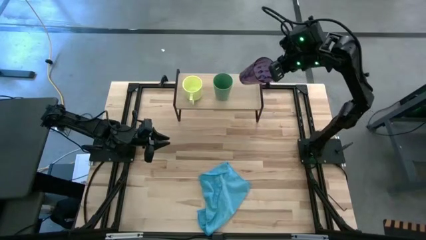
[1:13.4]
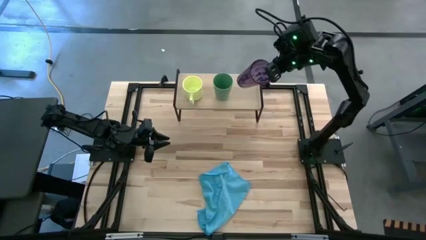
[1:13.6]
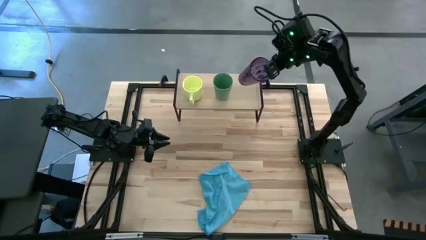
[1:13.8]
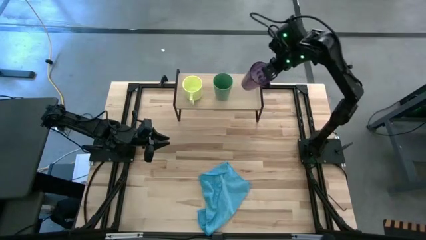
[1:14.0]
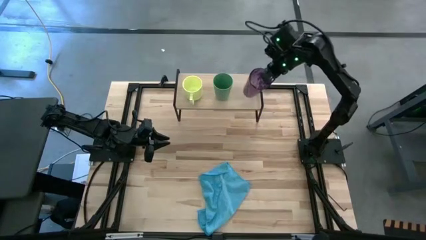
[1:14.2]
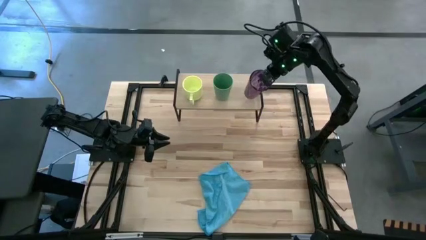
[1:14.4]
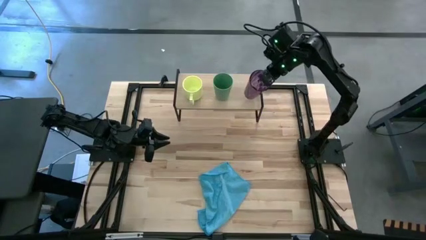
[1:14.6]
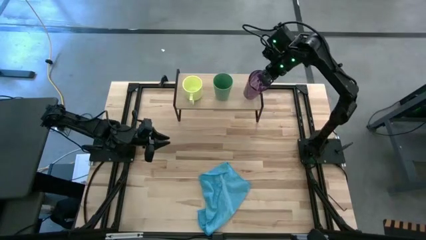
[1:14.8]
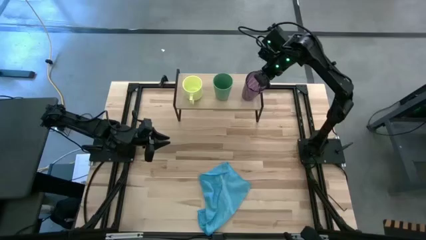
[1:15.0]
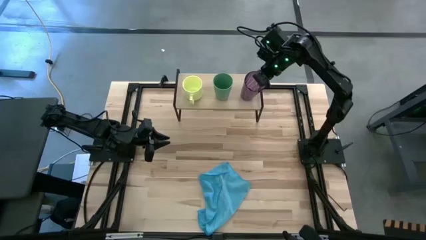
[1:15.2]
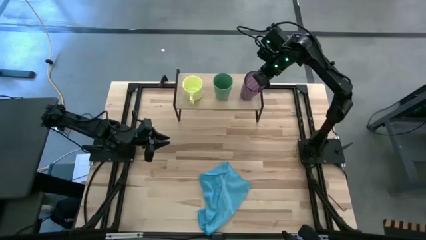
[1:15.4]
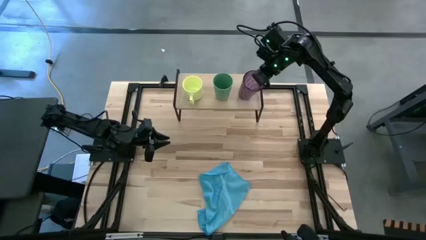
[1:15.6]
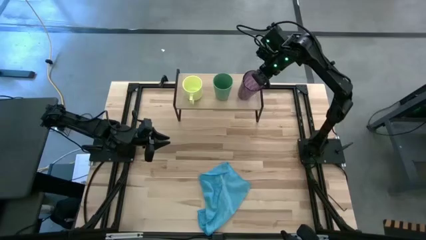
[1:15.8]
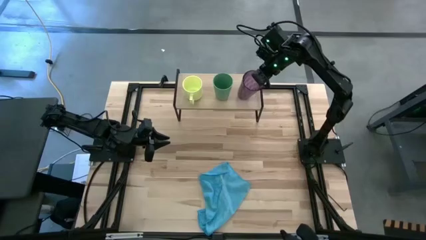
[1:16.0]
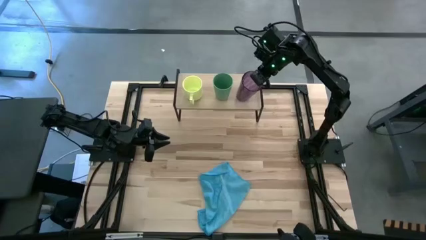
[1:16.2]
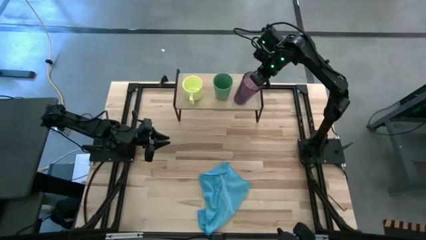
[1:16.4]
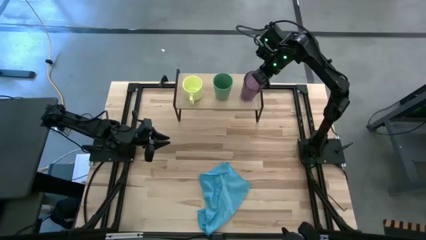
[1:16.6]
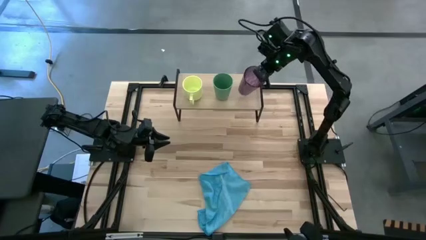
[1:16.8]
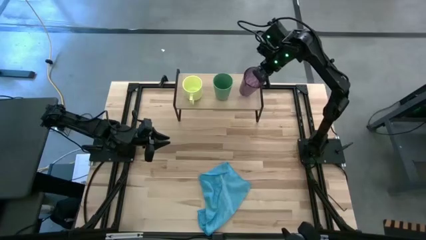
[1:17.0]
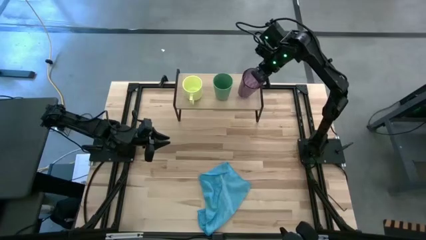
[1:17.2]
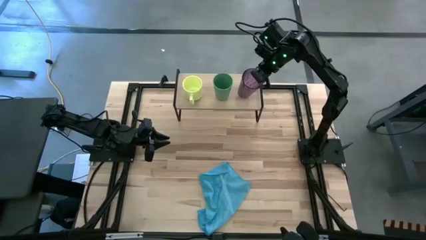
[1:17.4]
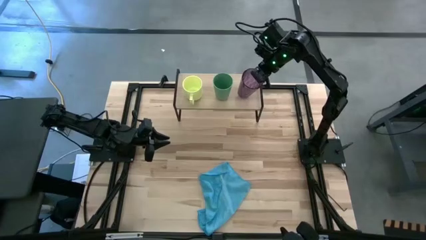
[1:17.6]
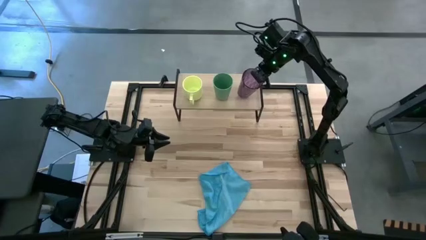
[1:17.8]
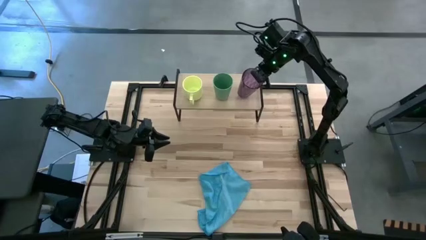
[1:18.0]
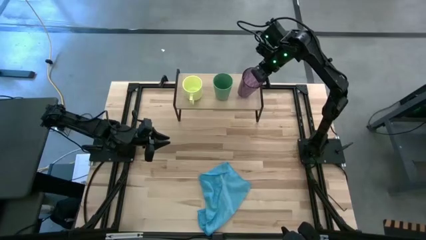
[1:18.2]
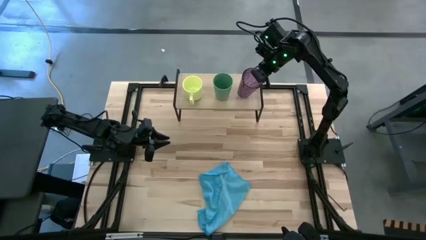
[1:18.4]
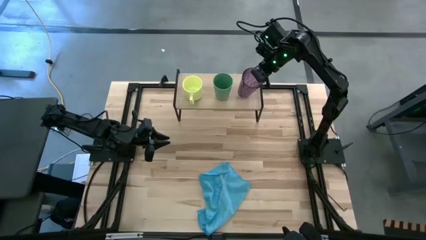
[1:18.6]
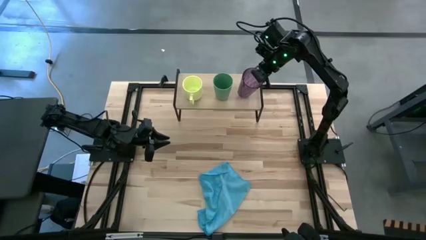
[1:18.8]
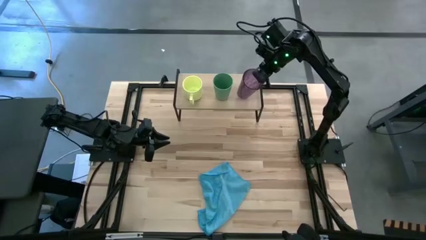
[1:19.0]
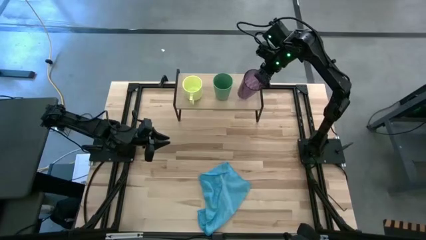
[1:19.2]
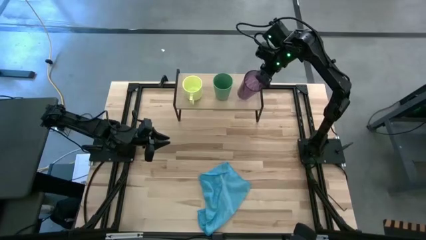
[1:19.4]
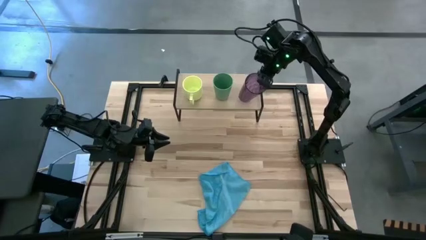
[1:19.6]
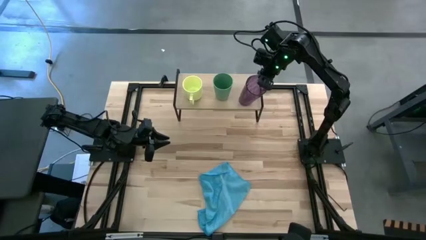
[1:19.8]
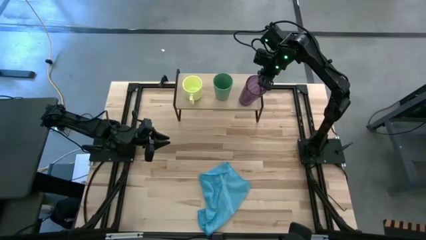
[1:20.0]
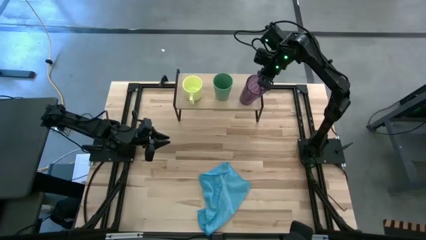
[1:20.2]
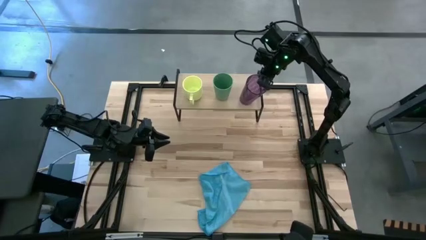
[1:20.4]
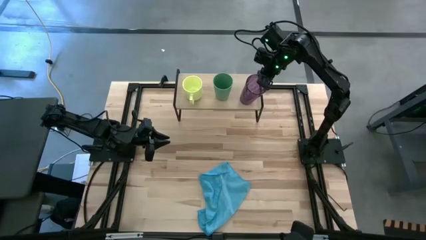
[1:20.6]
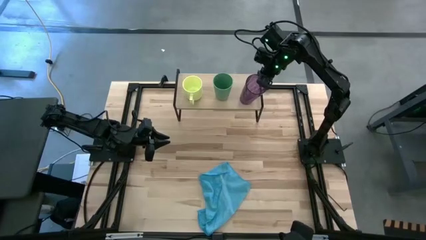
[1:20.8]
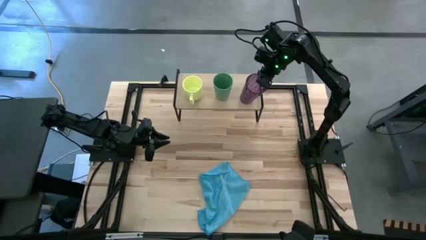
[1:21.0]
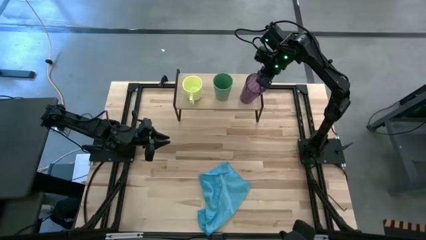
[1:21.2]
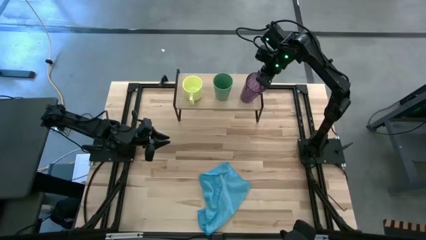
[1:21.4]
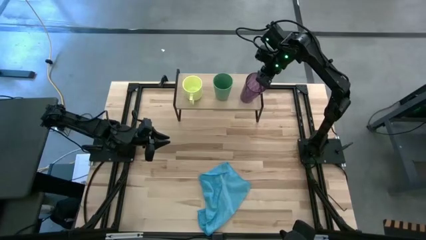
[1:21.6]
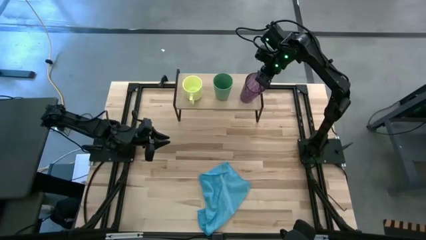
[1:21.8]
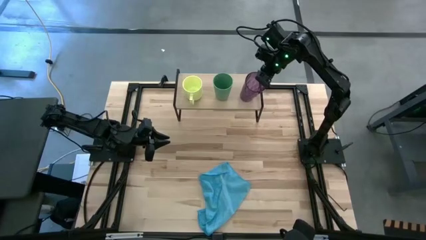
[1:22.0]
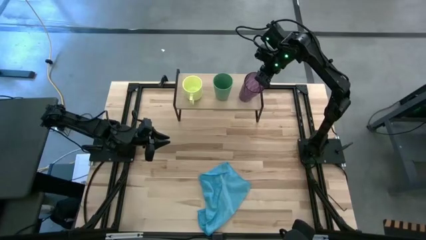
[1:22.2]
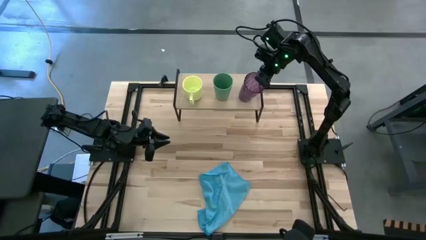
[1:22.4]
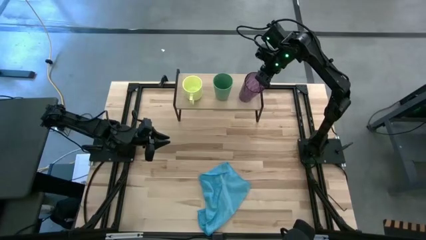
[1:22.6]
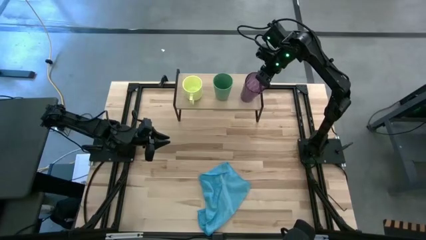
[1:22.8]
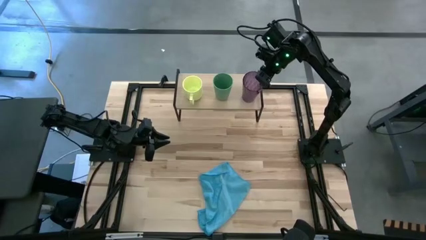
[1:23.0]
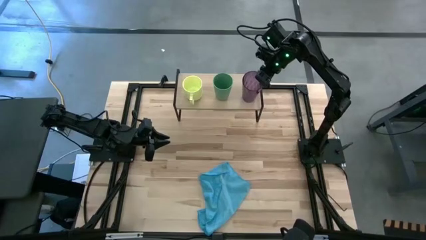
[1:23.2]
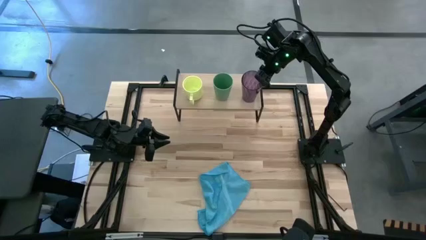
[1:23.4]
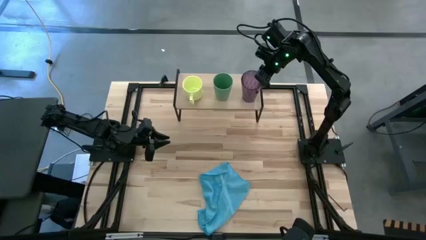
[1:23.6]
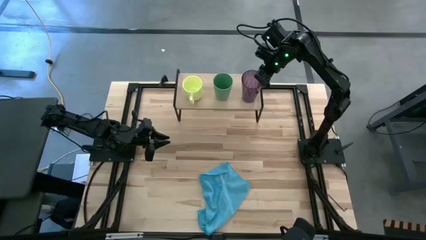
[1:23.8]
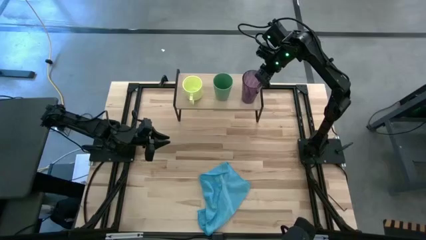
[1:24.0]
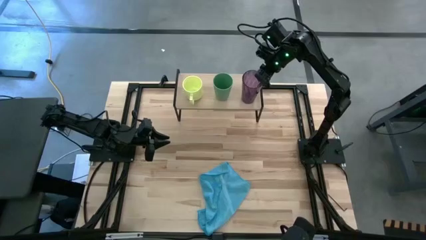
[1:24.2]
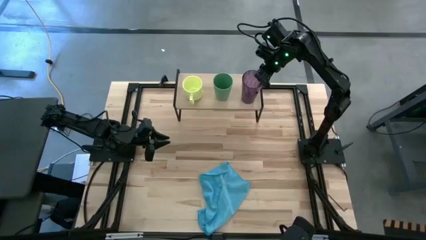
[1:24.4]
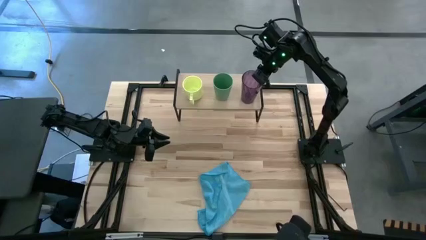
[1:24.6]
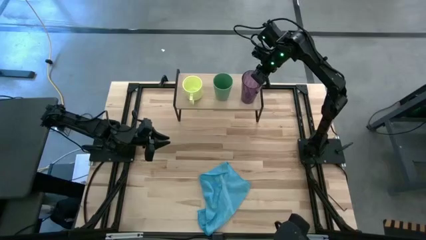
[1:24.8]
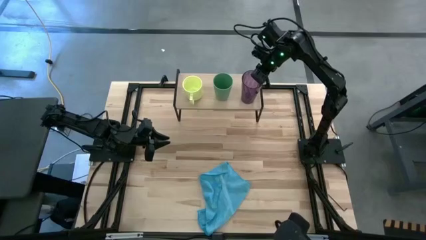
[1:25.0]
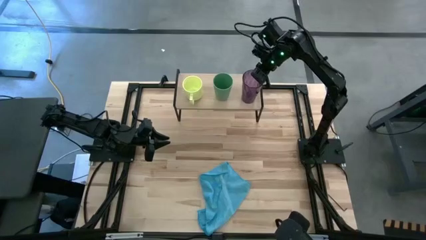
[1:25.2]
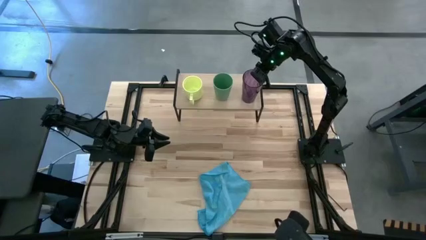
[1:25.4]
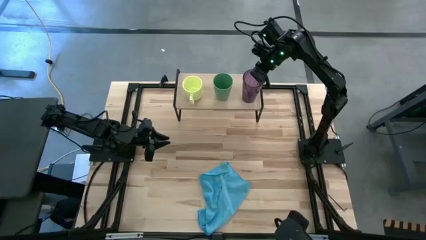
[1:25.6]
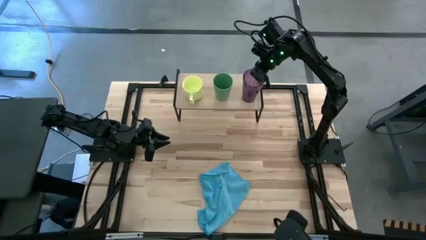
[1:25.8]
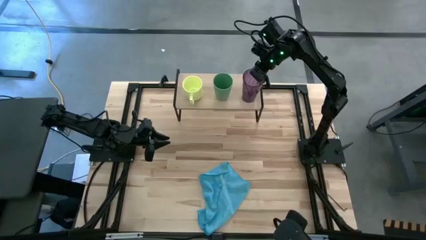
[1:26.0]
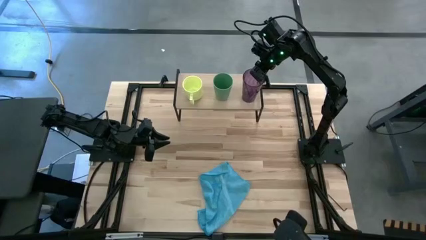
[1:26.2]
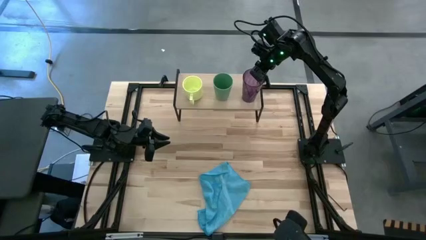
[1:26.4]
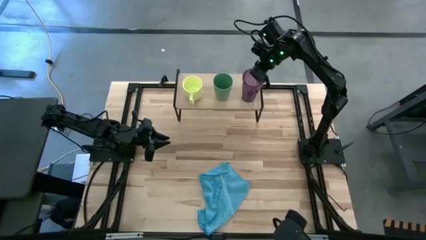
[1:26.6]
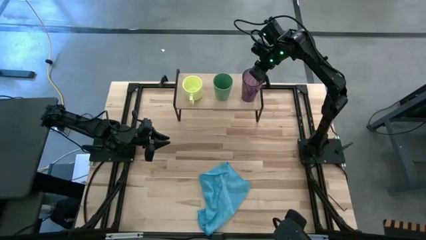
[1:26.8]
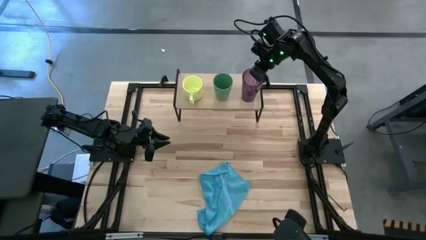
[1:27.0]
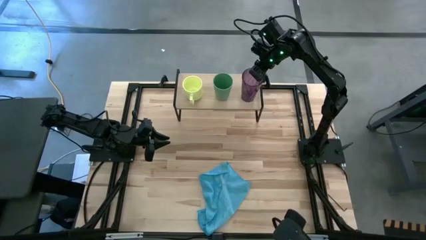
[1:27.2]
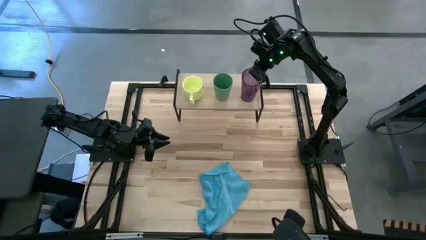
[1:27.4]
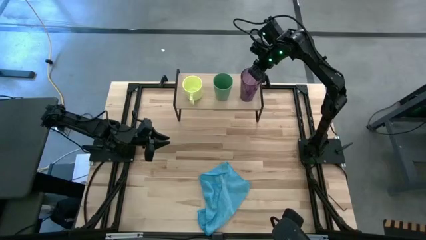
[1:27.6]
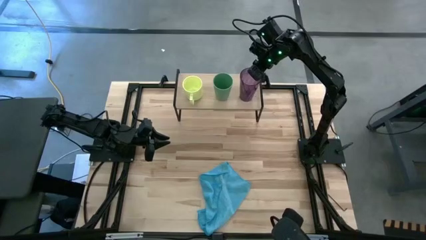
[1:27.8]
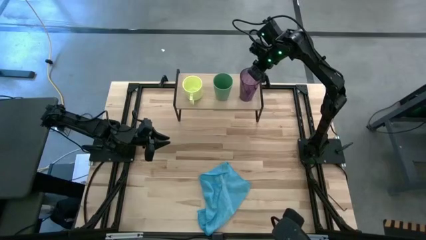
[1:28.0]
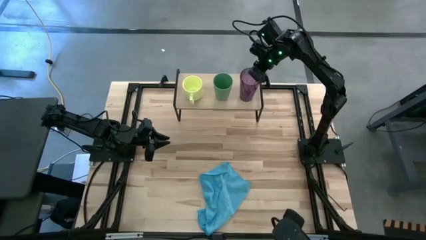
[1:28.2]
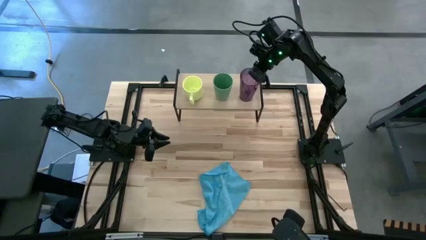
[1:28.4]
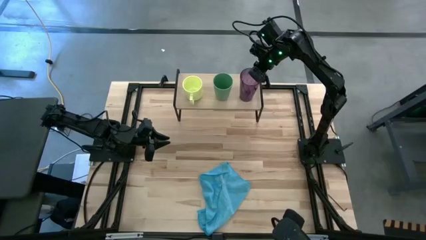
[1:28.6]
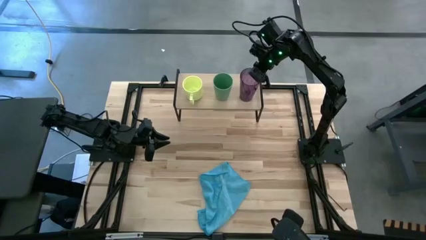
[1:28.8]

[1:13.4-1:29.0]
Task: Stack small to large cups/mugs on shelf
Put the violet cup on the shelf
